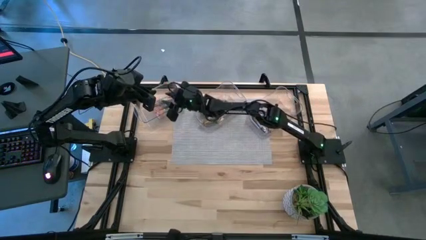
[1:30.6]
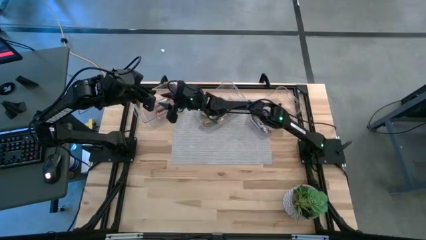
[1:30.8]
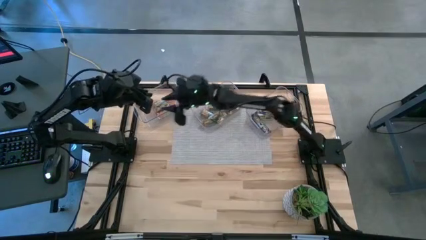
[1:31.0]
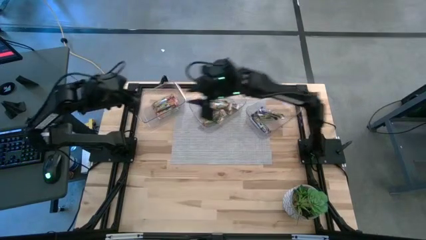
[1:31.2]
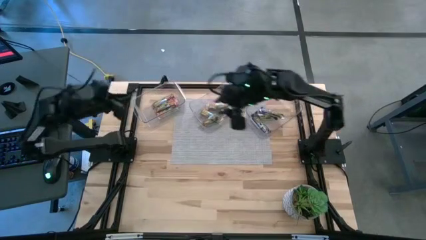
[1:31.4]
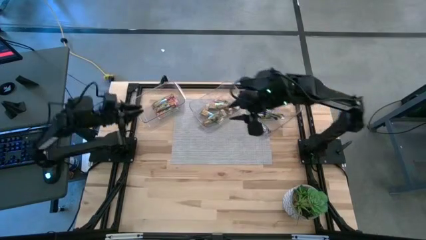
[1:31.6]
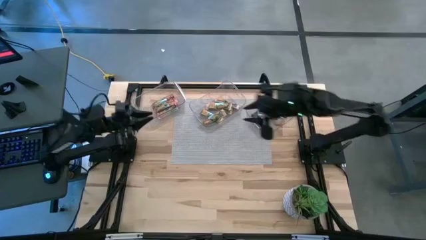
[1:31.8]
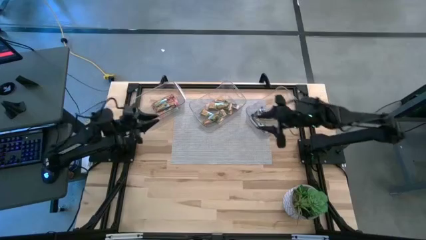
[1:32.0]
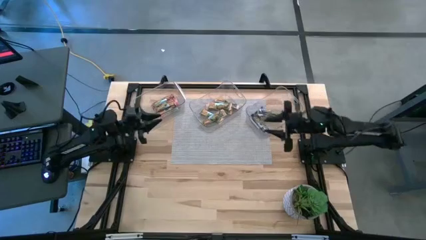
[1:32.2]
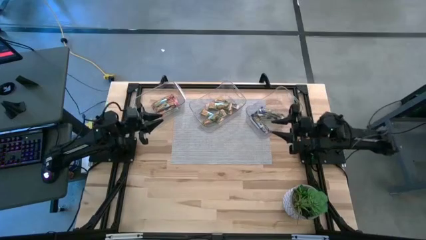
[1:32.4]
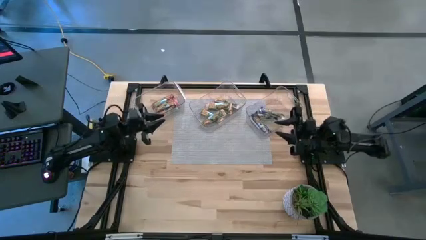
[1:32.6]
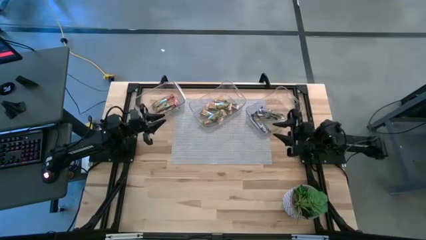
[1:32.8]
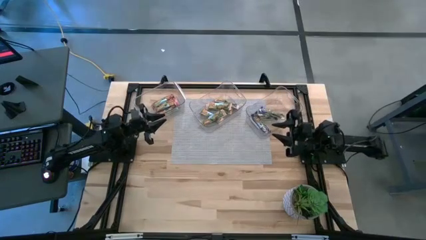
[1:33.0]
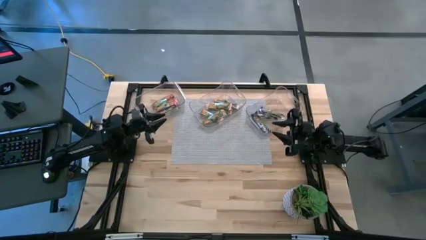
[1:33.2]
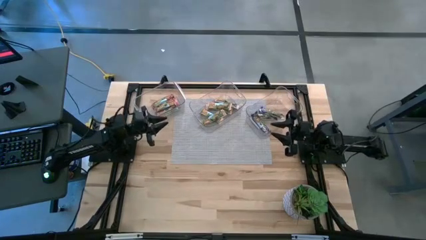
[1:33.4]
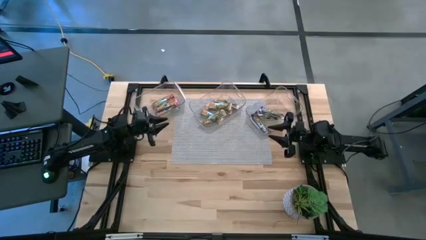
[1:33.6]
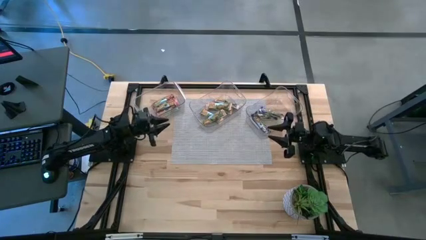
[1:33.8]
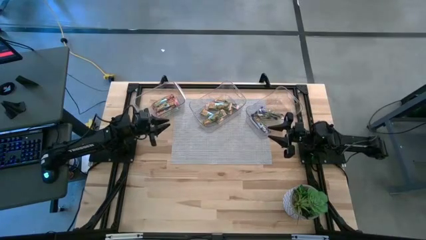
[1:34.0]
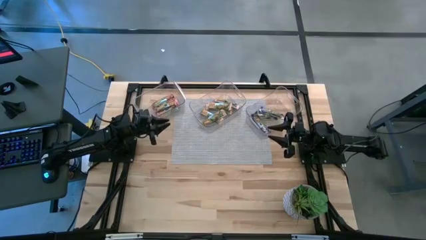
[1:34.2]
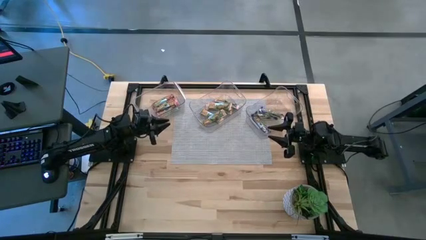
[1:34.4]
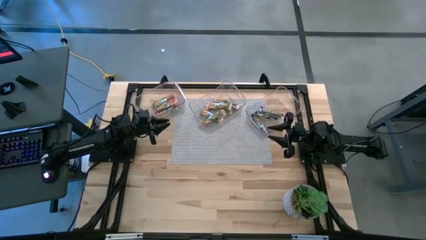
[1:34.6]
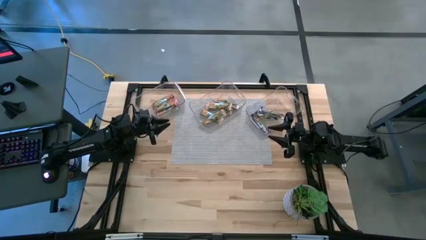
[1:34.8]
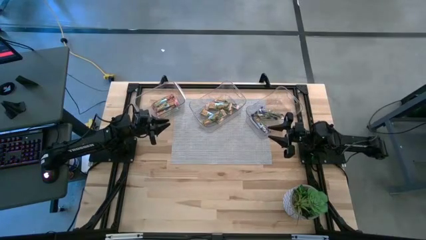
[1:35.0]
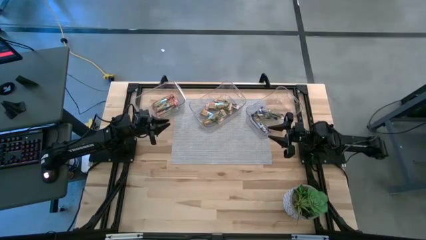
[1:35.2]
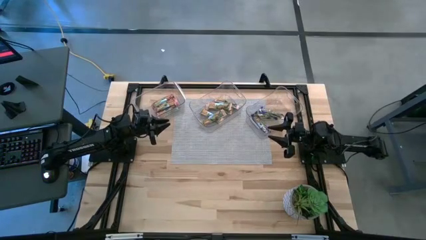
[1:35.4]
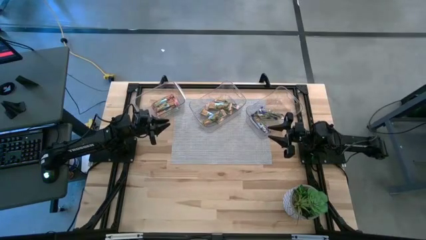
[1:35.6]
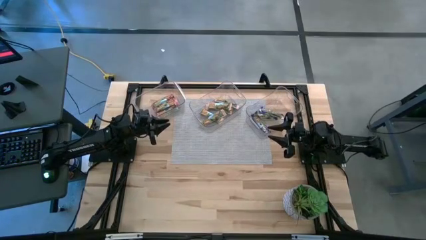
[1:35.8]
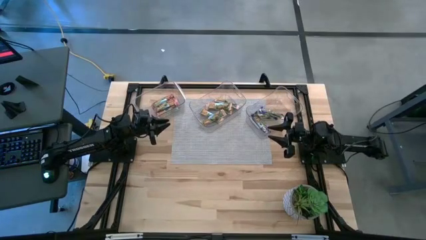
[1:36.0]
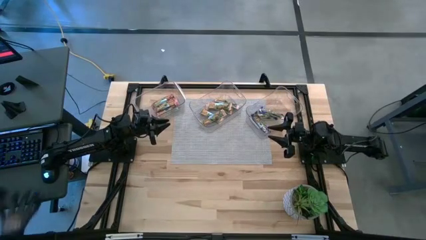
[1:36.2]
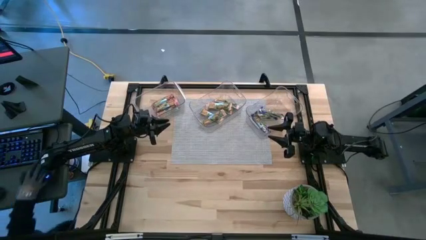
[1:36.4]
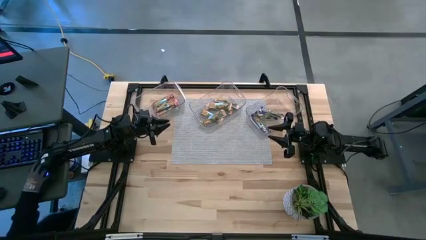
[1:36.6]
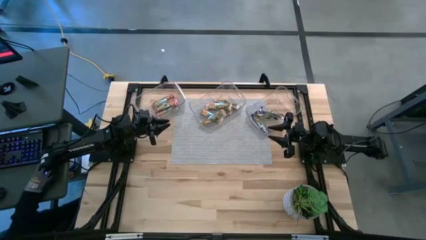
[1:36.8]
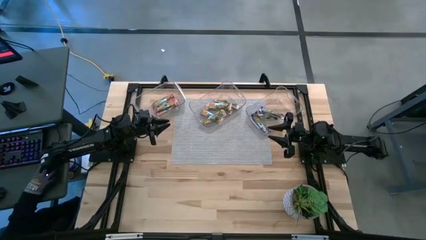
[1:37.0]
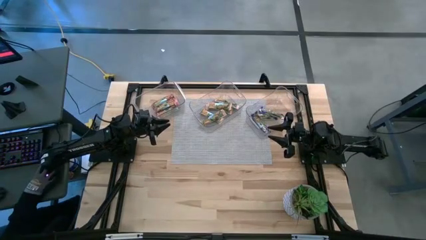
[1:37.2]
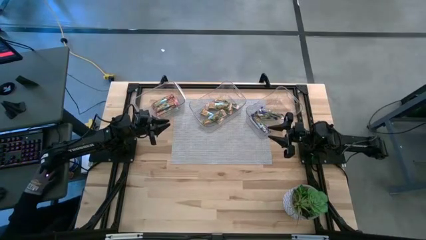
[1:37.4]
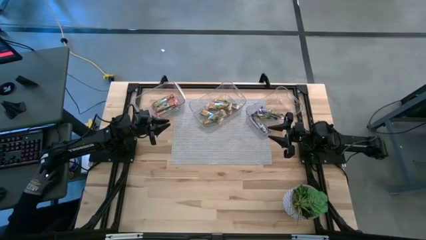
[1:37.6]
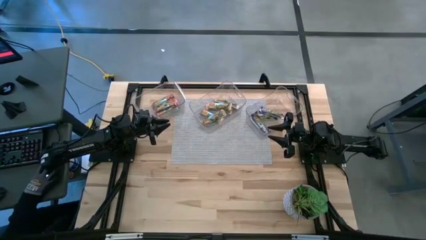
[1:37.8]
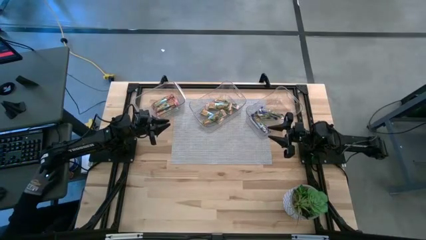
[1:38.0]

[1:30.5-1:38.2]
Task: Pick and place Granola Bars by type
Return to Home Position

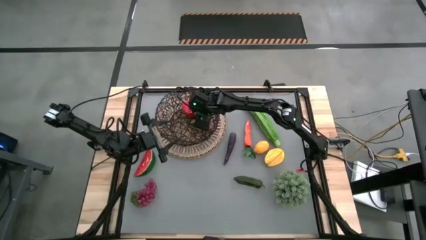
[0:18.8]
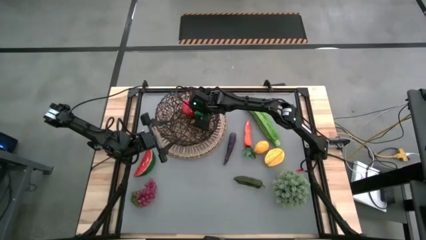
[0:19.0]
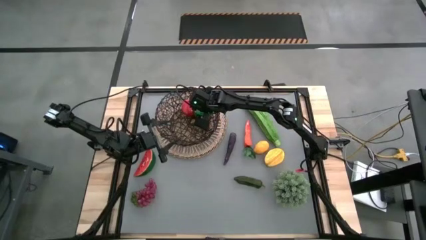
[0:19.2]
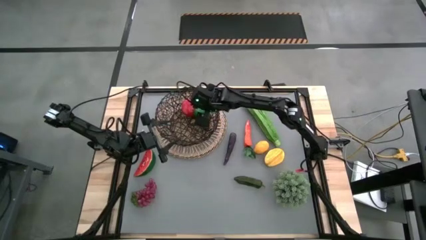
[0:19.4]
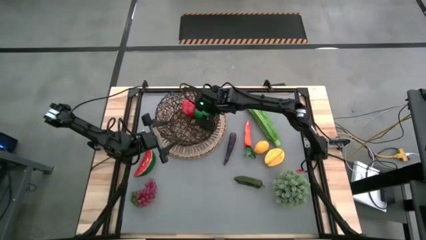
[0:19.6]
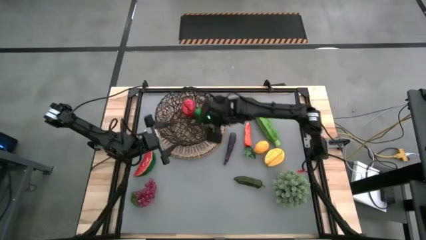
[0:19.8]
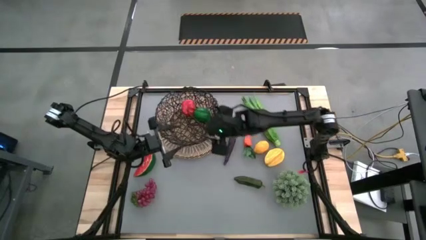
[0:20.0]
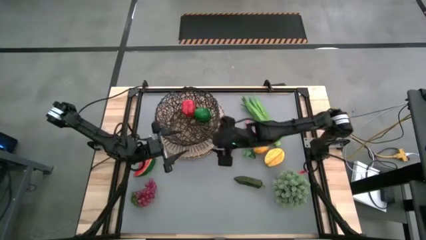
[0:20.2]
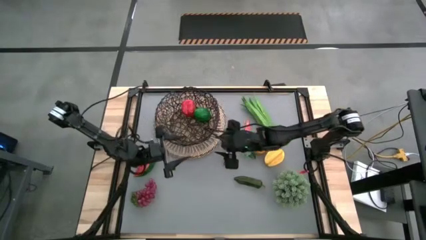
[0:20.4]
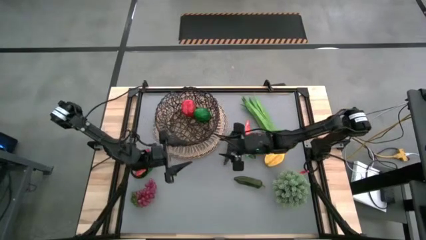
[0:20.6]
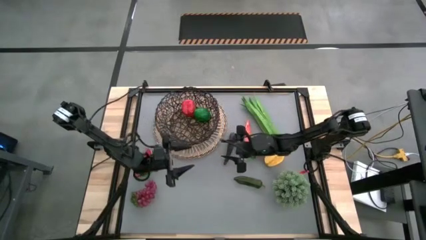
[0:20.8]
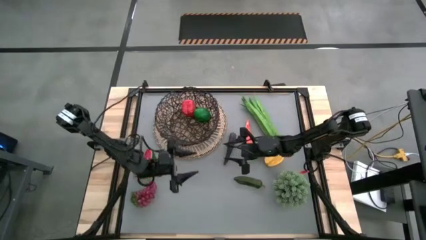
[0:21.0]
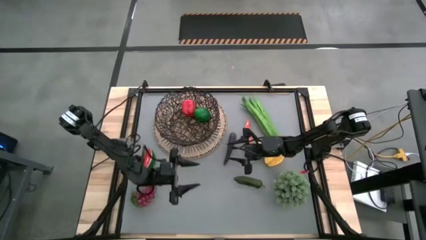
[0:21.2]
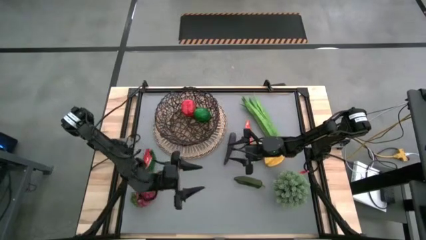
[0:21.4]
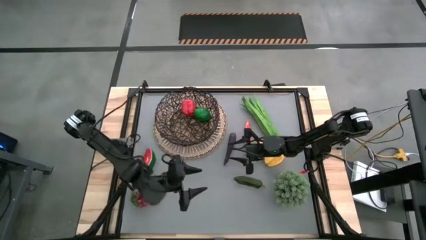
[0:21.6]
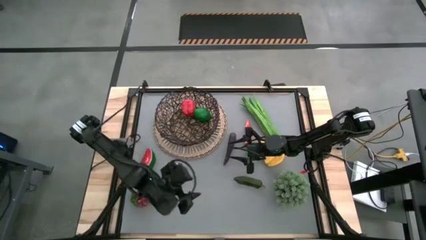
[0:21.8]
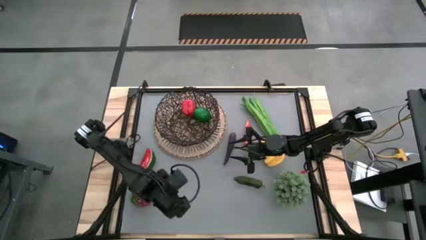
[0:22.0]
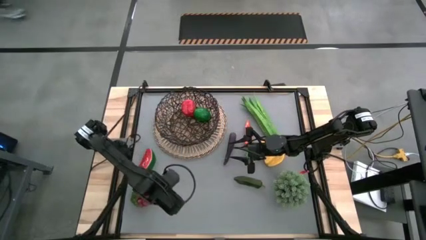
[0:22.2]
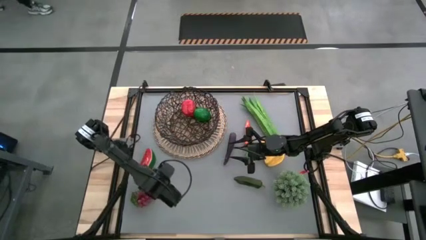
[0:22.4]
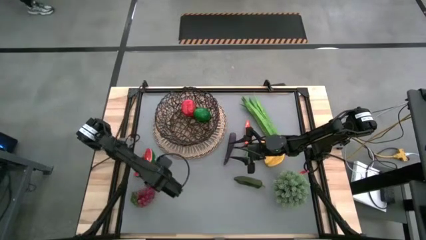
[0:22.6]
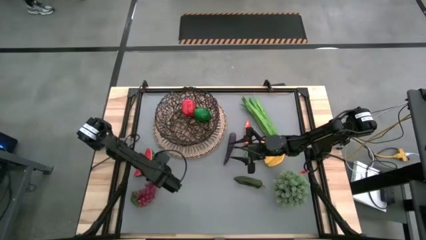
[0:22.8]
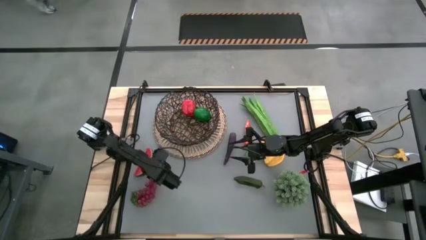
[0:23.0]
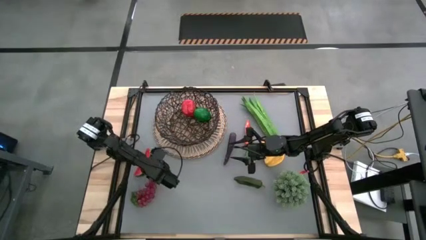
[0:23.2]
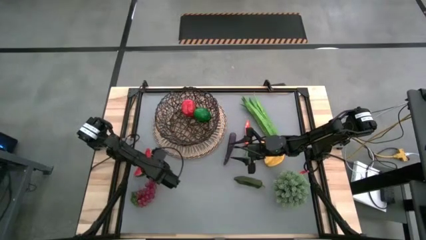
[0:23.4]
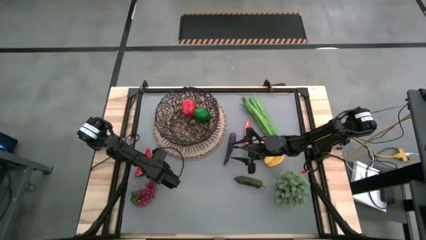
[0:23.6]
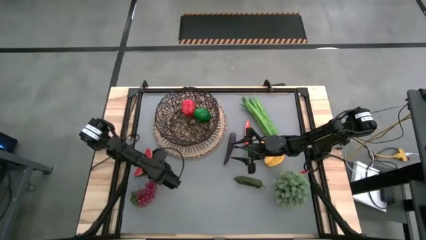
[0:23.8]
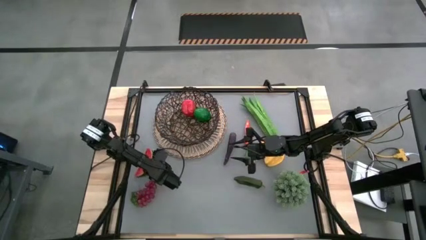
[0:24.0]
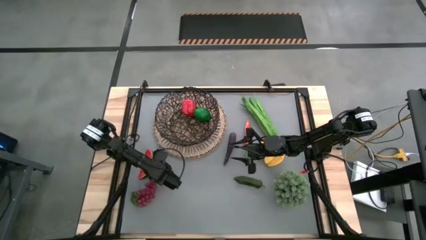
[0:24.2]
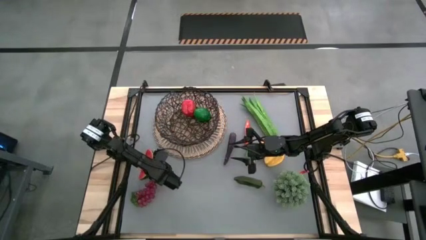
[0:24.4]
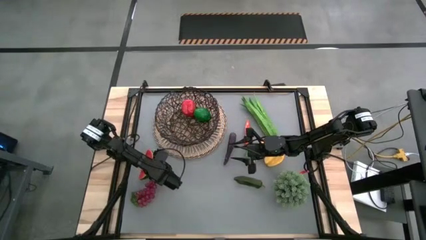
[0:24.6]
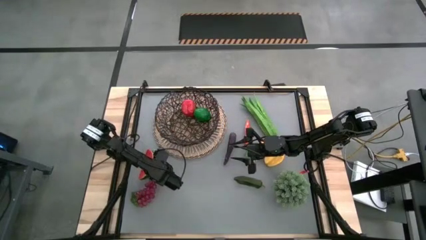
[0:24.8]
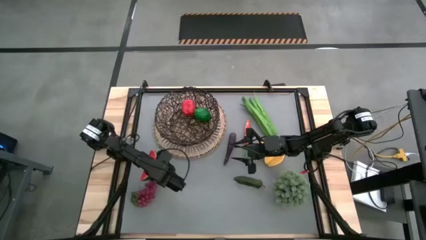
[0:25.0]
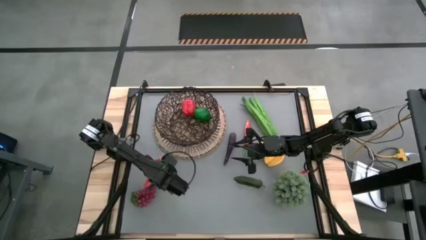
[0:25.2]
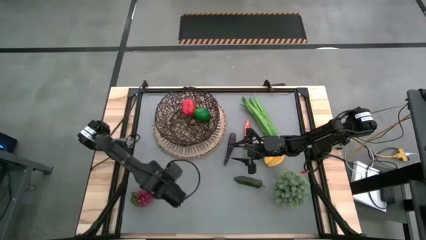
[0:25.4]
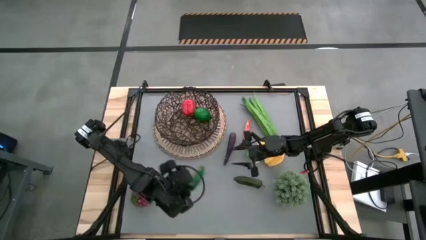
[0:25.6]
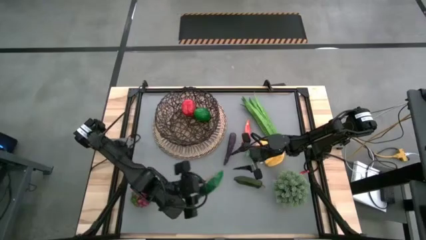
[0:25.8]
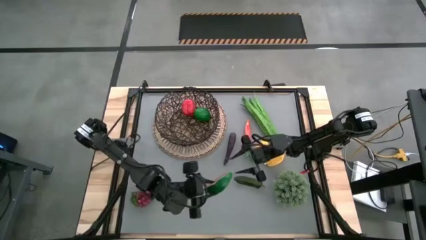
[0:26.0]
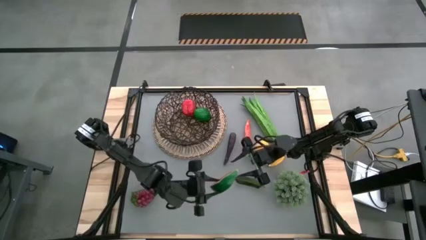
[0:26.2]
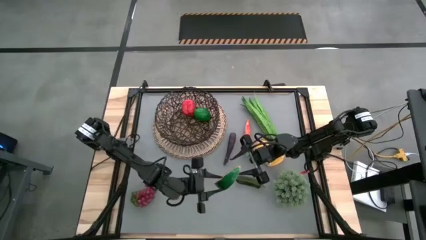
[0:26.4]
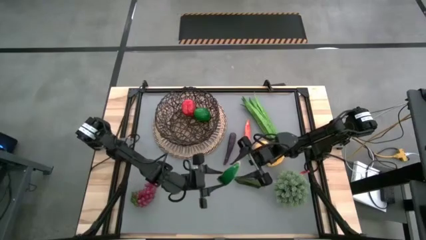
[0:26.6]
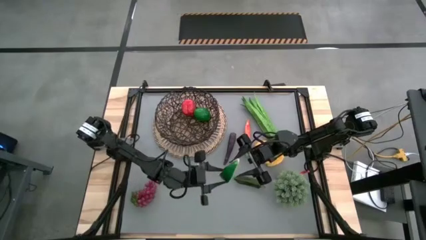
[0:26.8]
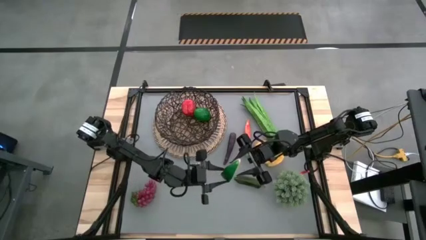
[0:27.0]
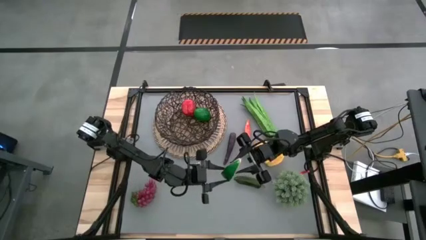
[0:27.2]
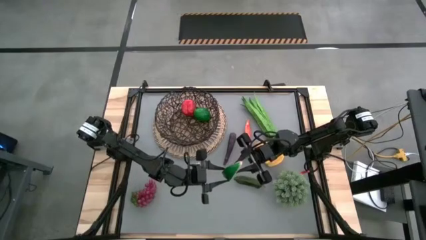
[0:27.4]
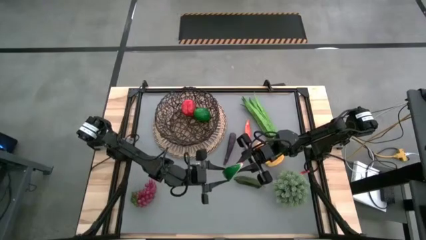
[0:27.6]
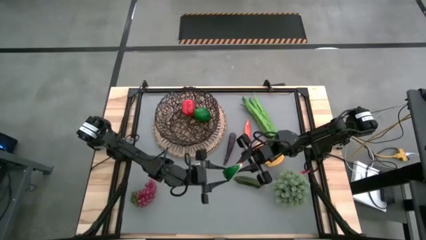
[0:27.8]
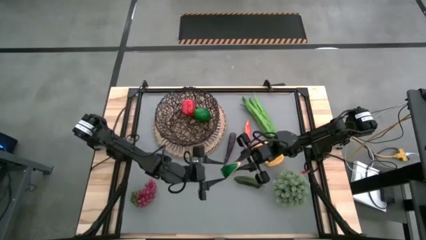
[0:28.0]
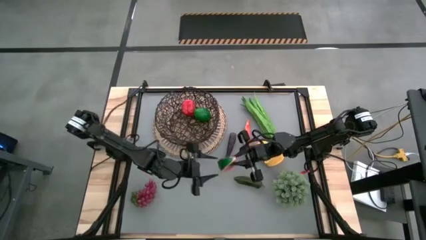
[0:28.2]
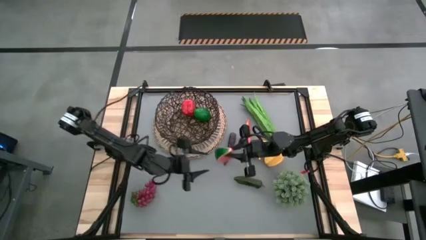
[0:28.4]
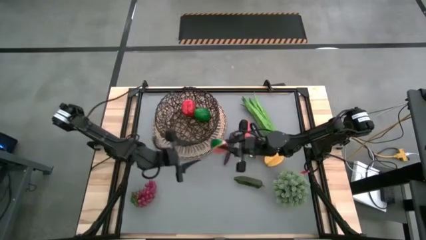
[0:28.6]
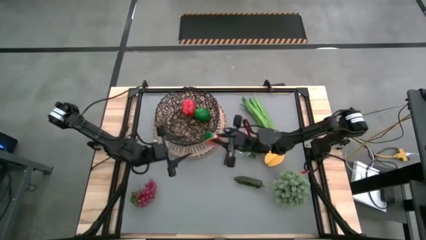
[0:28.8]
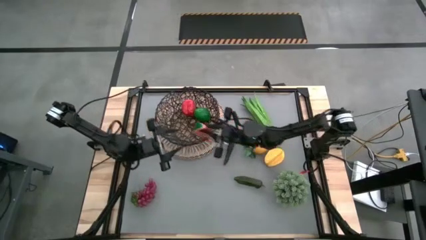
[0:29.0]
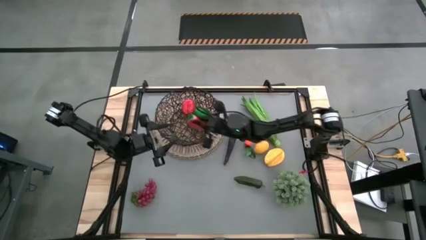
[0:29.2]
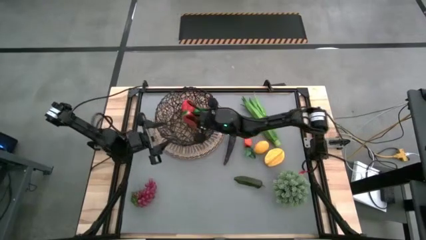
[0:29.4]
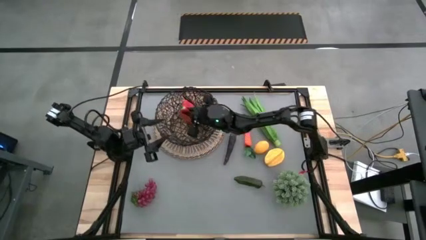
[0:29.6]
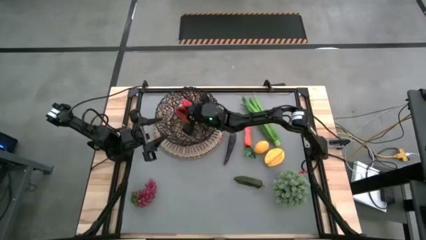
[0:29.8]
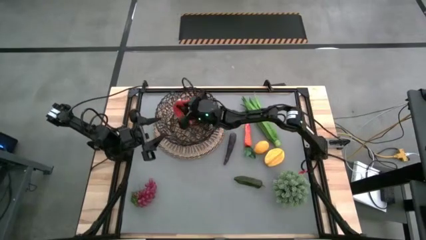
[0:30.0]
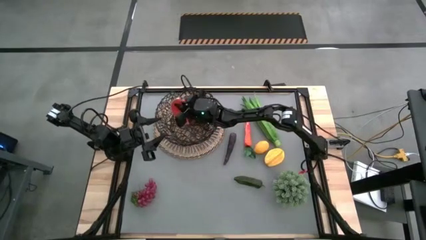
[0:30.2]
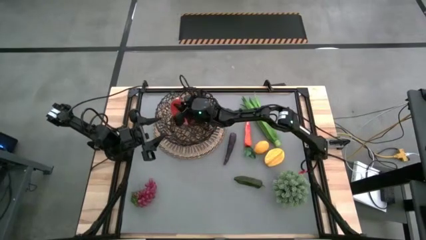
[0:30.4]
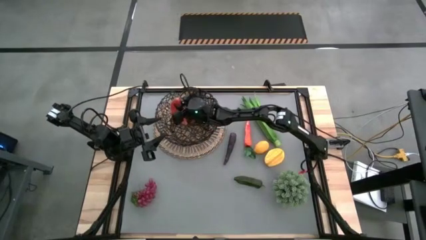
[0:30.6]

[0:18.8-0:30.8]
Task: Build produce basket
Put the red watermelon into the black wire basket
